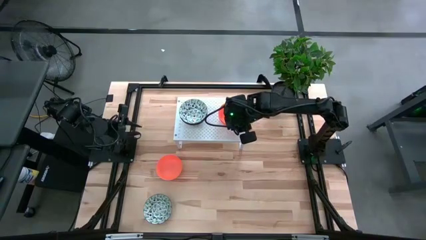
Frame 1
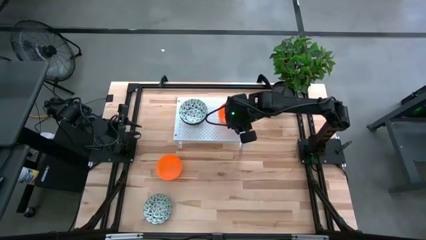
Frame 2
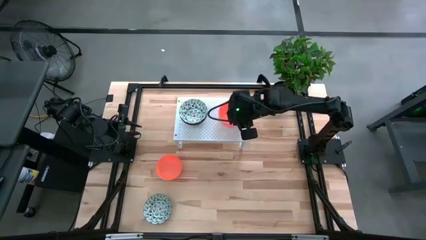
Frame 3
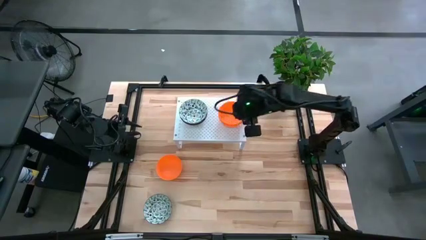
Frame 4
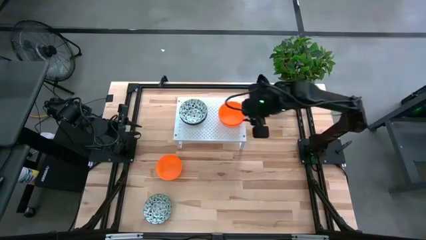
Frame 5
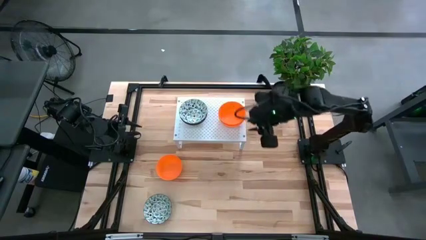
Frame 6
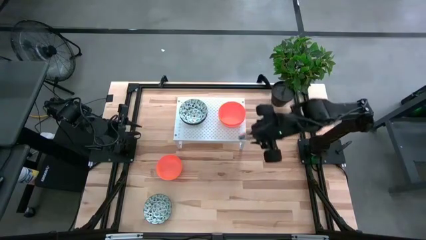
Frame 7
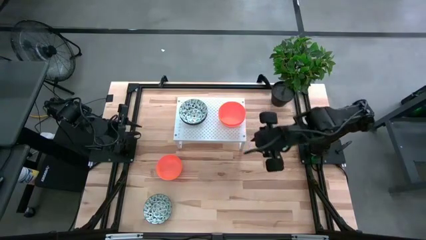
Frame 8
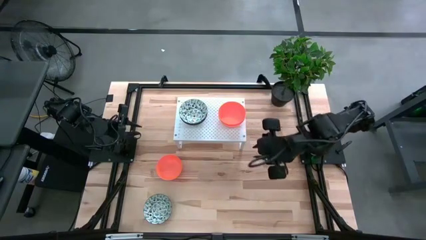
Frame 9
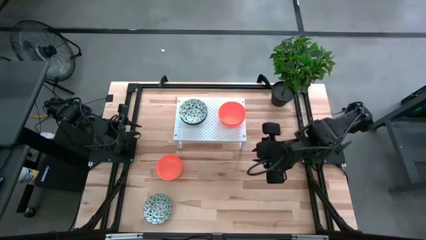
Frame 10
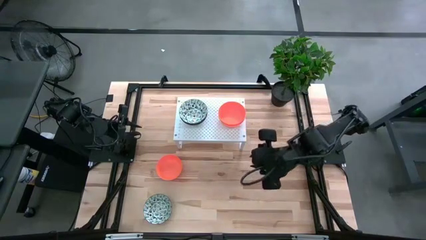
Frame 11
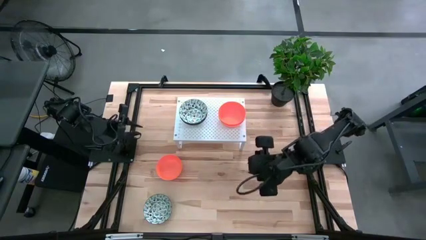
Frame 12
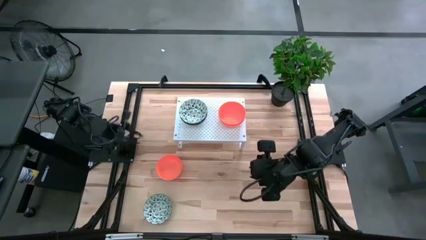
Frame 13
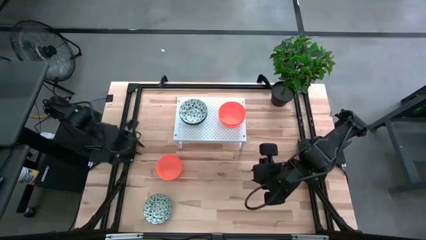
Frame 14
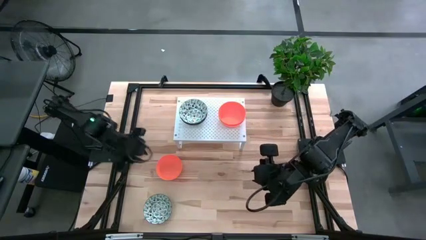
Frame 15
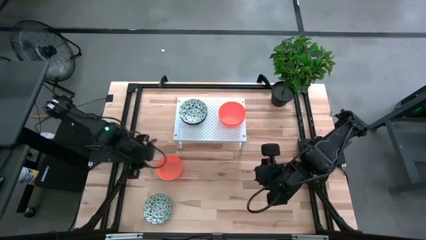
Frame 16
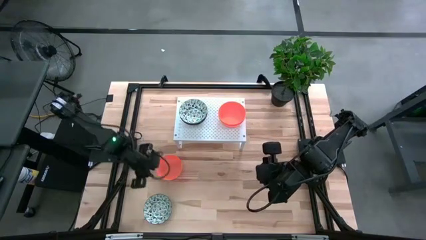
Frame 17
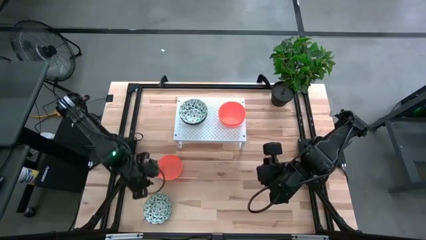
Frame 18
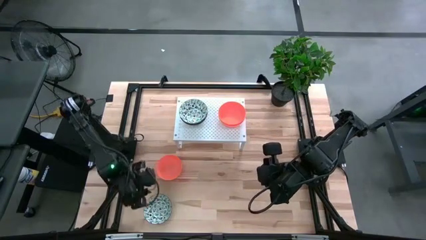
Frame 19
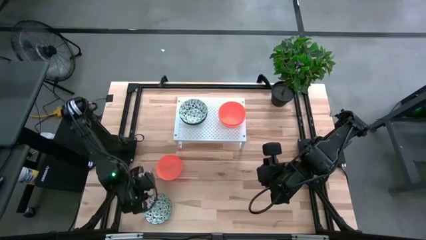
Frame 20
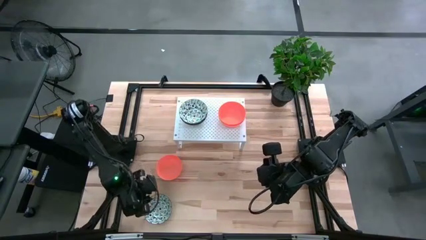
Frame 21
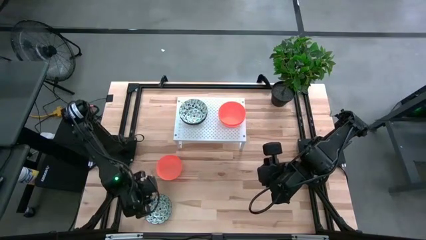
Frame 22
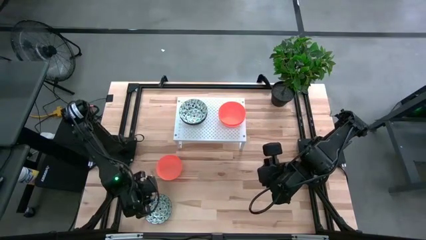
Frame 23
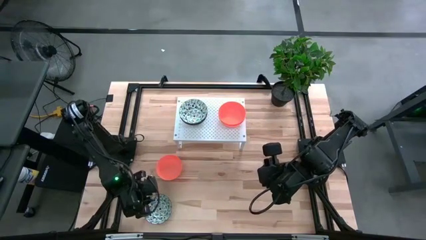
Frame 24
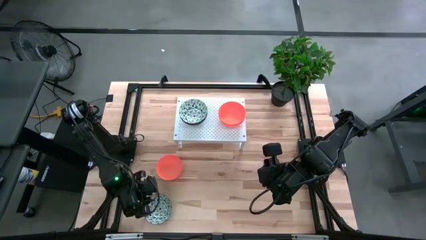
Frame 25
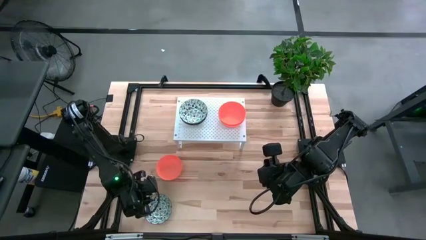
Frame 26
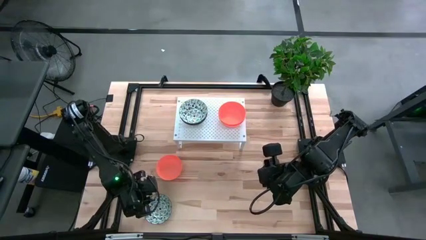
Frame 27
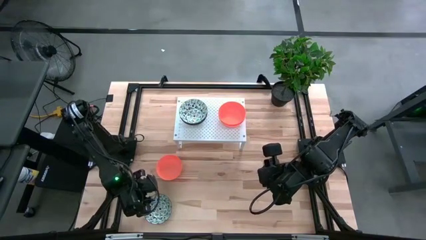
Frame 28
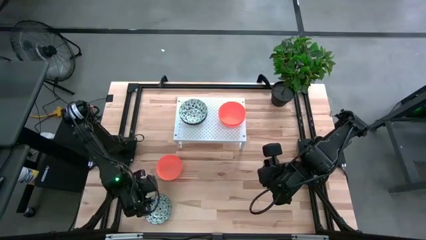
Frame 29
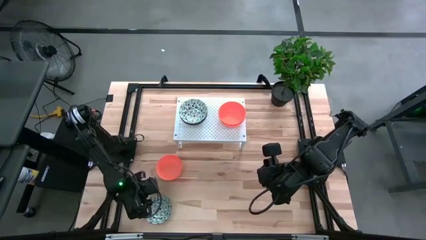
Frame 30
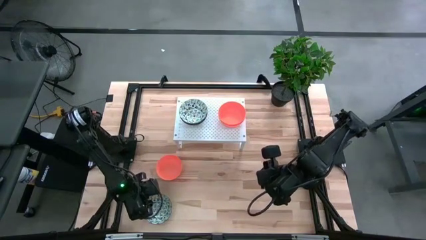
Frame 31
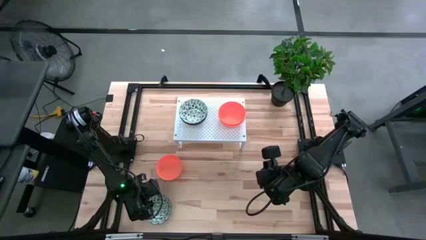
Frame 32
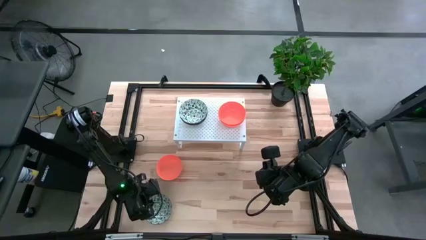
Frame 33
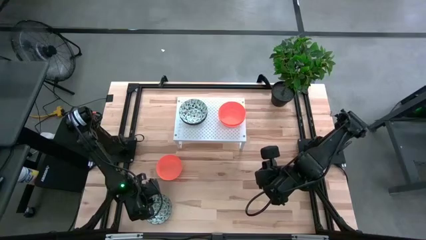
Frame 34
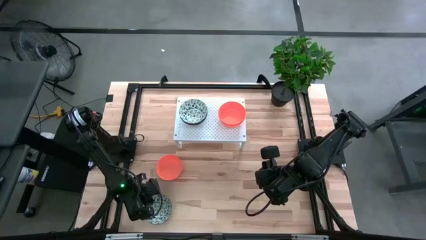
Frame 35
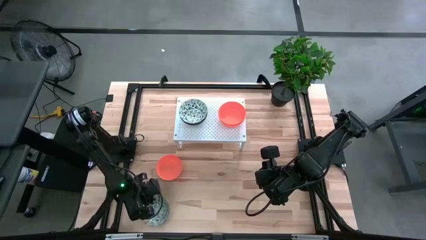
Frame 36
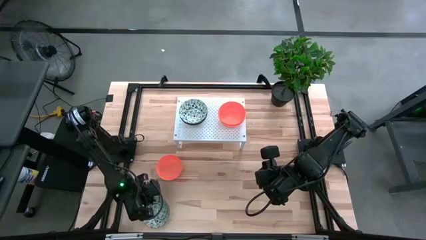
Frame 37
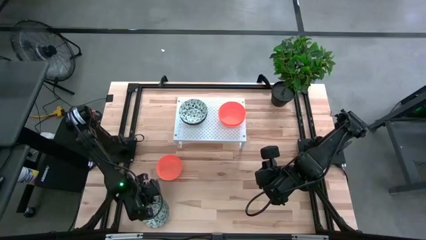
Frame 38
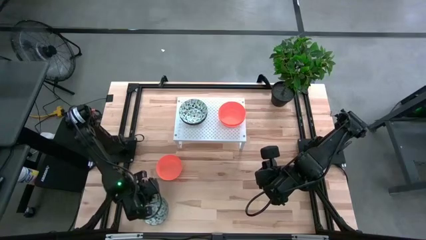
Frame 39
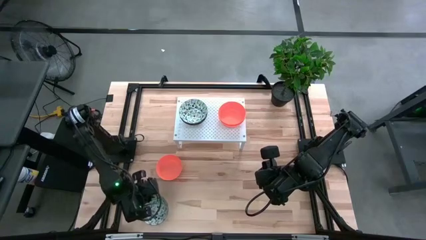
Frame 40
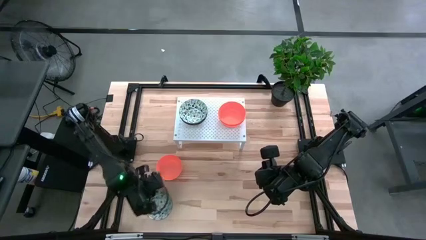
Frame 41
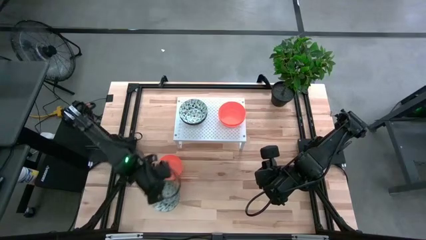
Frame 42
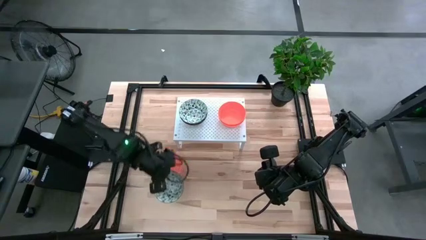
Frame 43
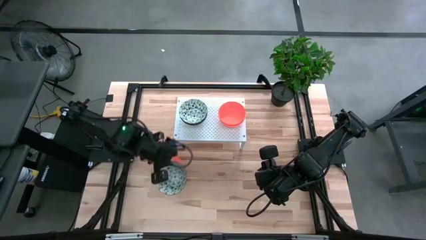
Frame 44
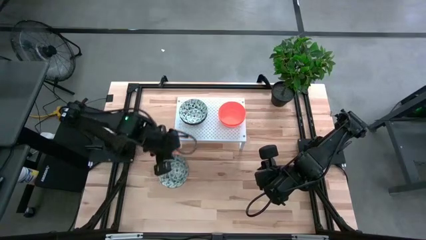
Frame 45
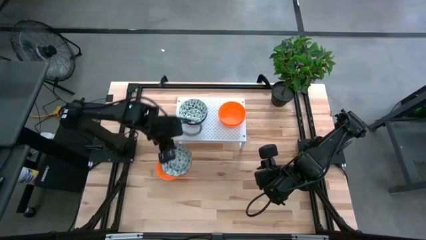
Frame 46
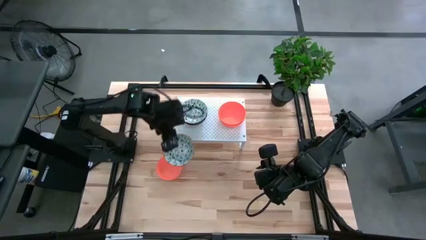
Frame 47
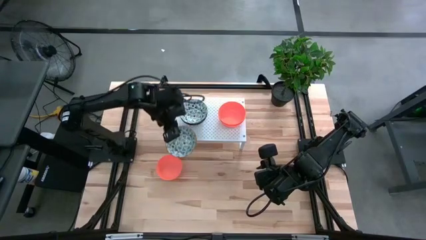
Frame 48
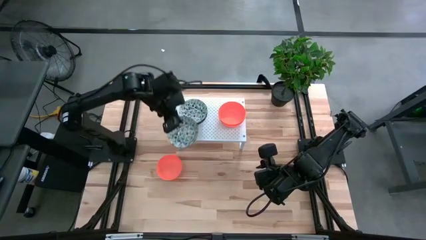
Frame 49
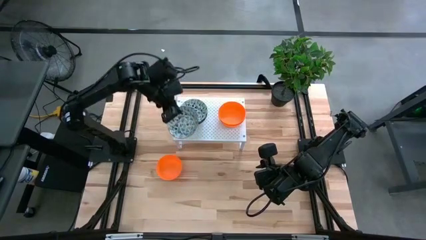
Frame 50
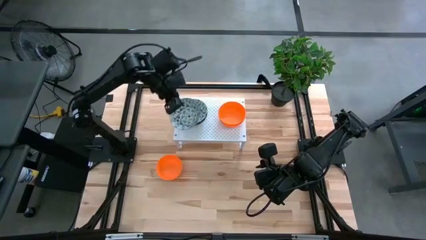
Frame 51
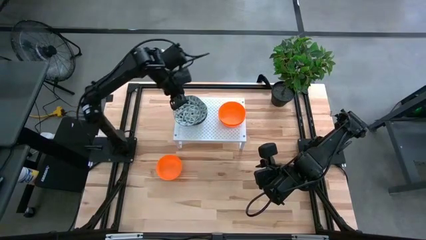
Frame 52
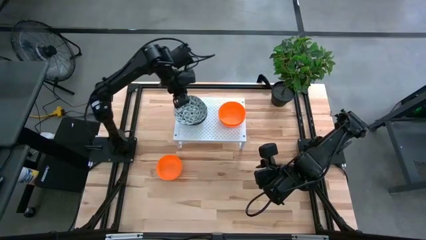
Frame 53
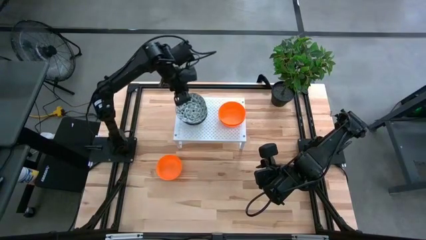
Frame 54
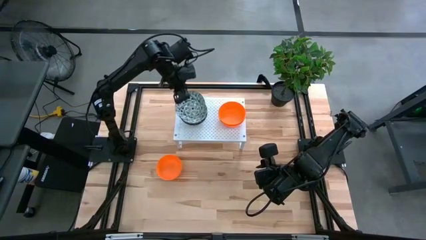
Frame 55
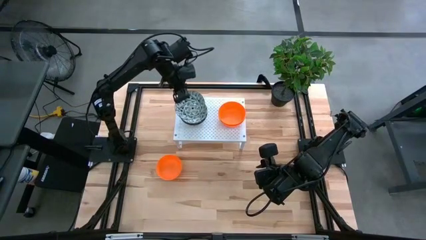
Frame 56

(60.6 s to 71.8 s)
Task: Pick & Place Mini bowls
Stack the green and white patterned bowl on top of the green and white patterned bowl on the shelf

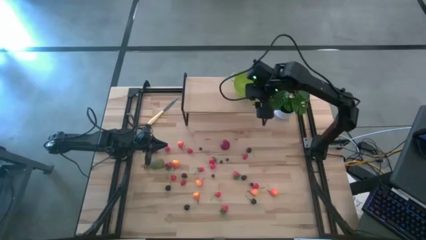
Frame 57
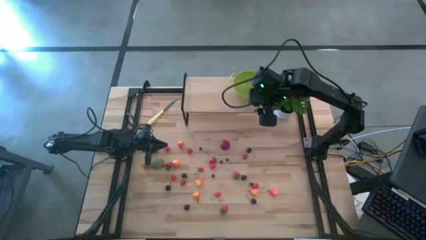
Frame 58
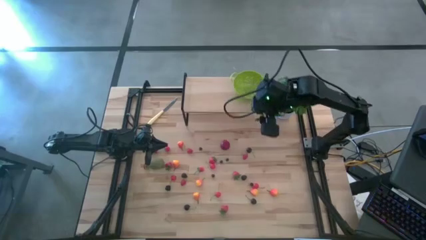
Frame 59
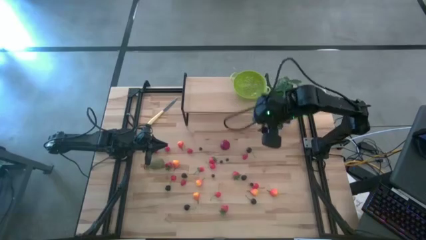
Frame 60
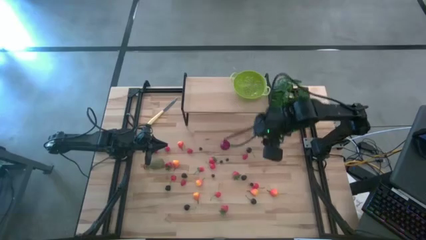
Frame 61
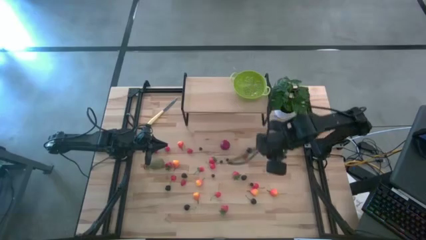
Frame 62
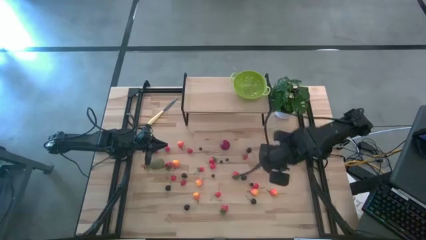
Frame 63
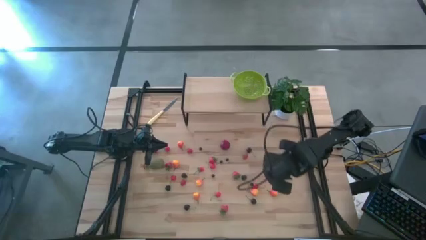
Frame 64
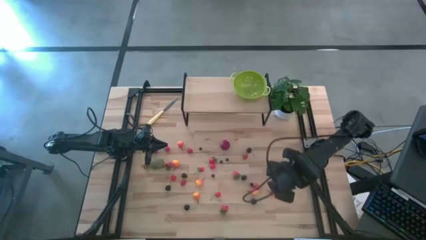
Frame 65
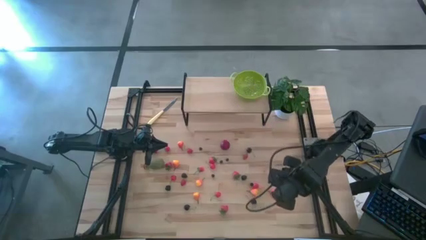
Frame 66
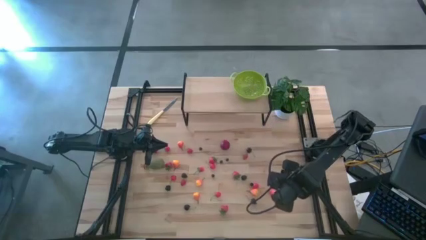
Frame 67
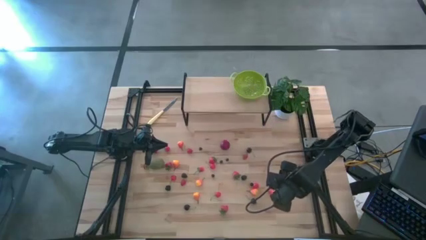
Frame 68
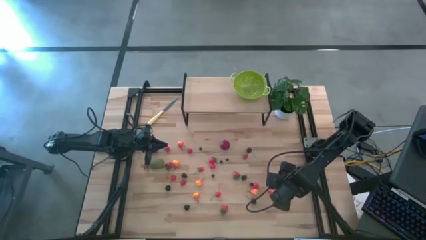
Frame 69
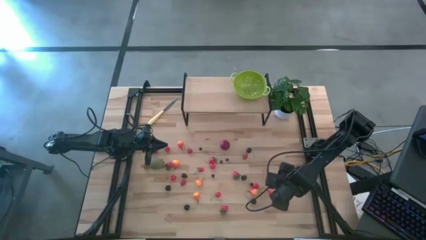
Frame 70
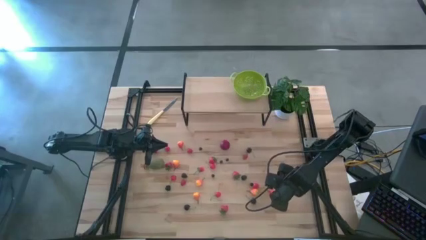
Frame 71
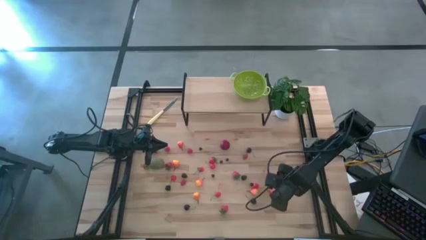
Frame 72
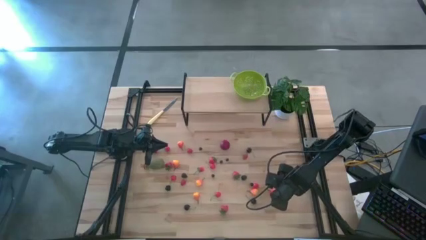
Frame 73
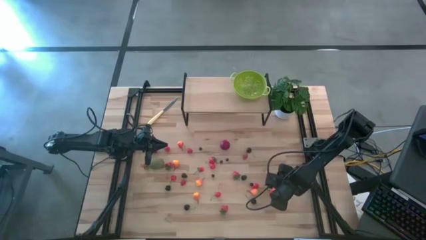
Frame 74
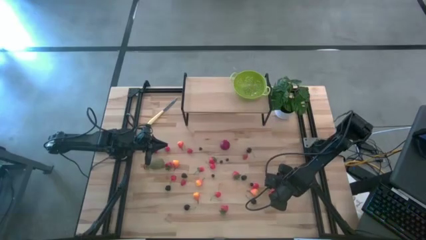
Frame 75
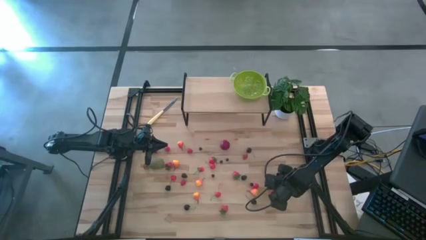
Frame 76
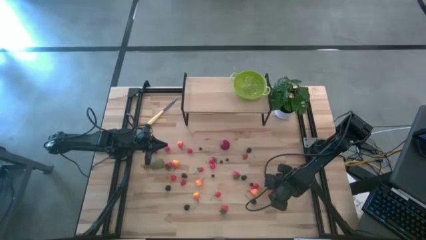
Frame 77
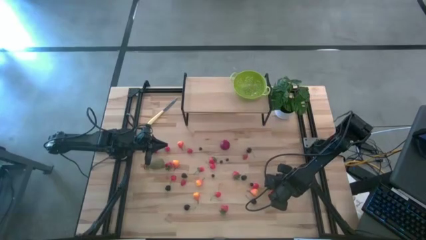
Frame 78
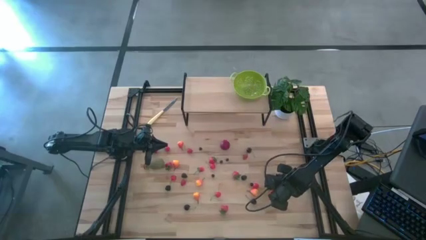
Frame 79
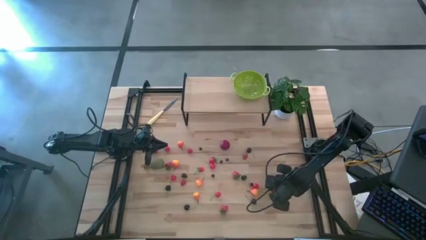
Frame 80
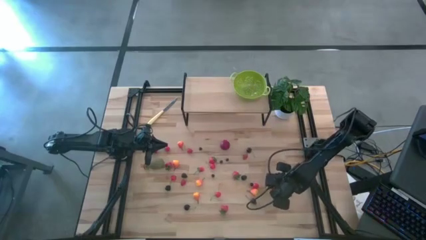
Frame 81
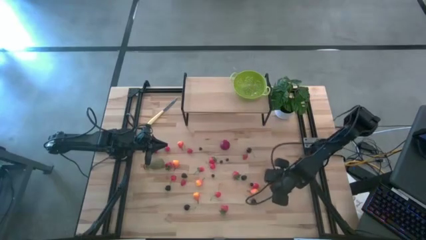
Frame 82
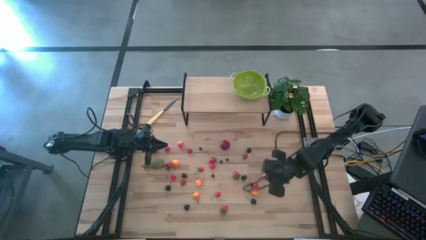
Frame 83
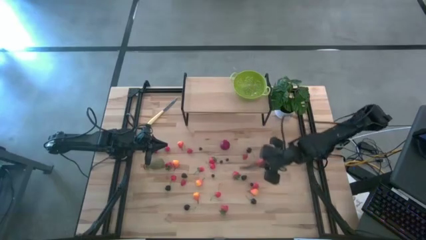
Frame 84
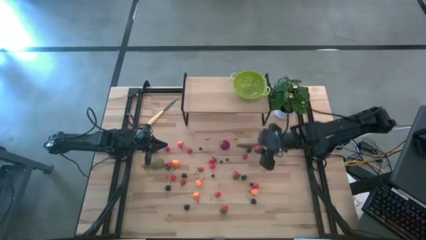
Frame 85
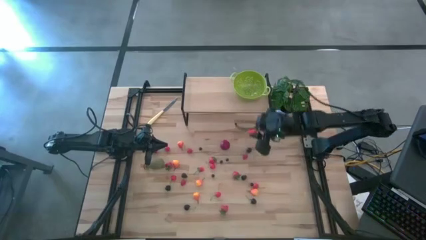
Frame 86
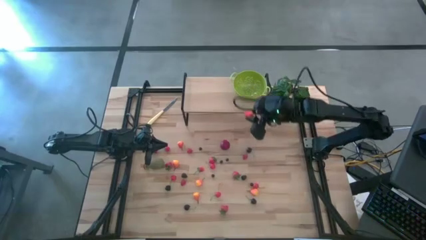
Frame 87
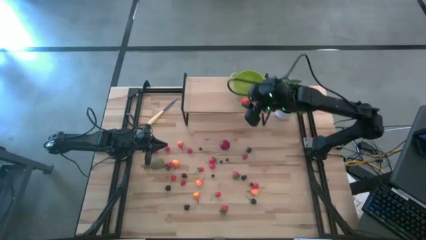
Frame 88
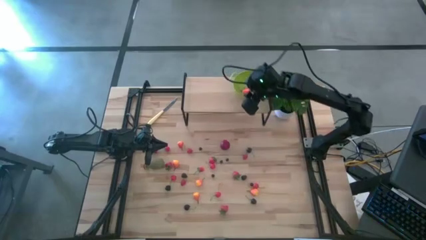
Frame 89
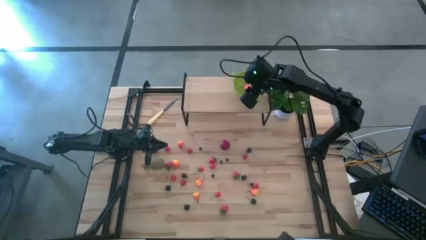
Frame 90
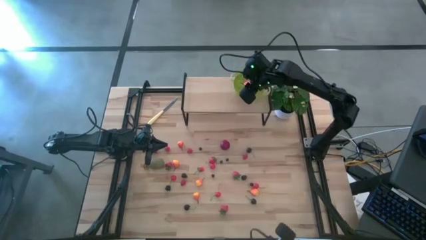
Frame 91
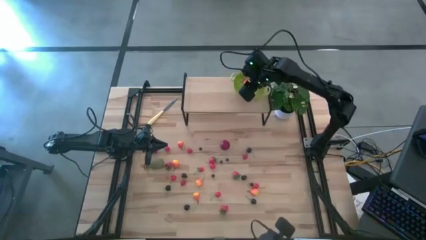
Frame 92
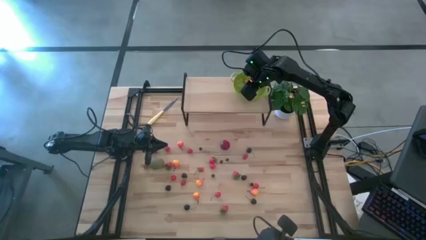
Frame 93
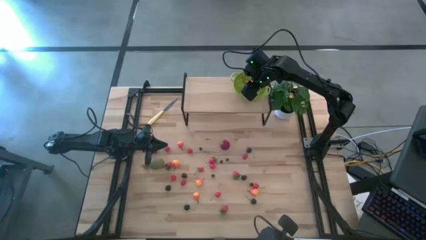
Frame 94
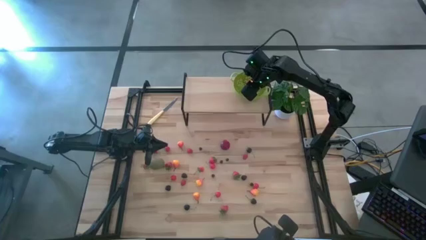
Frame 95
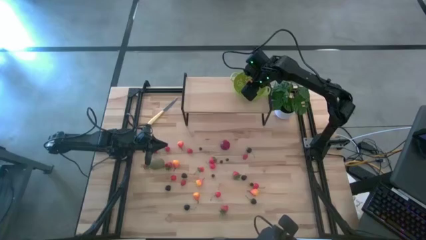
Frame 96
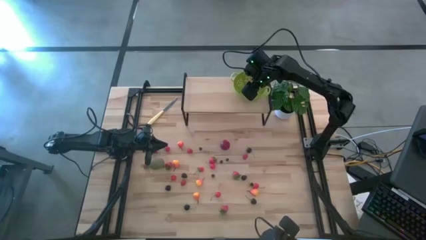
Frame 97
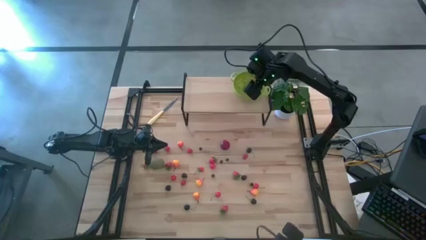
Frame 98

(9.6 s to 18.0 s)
Task: Build produce basket
Put the pear into the green basket
